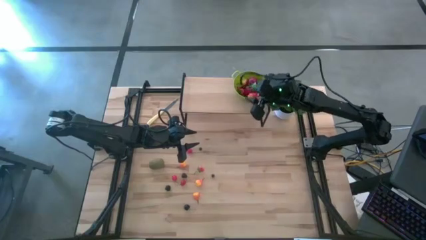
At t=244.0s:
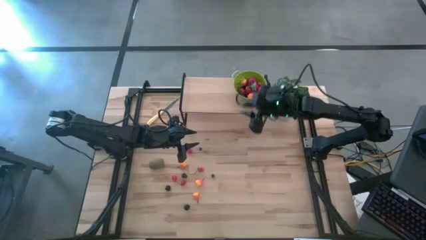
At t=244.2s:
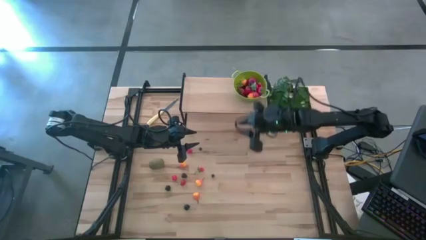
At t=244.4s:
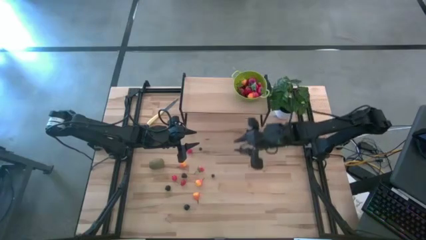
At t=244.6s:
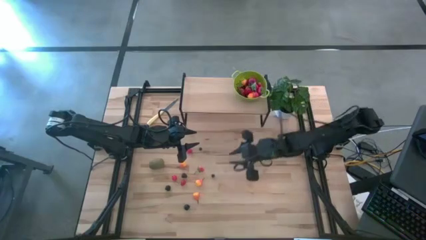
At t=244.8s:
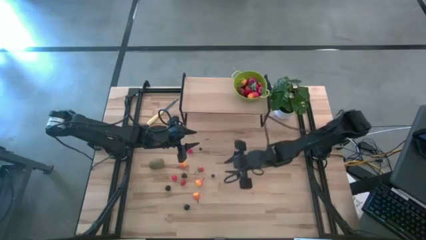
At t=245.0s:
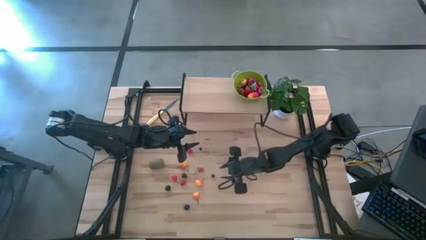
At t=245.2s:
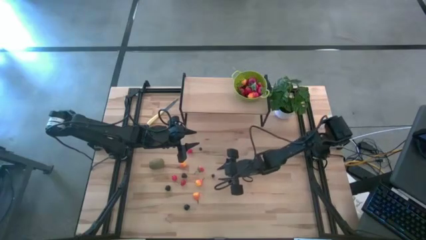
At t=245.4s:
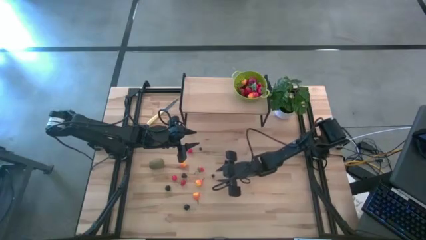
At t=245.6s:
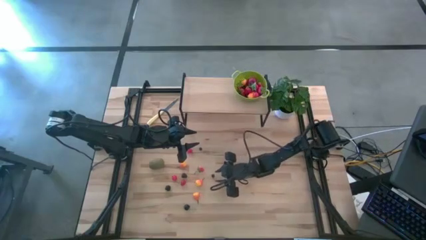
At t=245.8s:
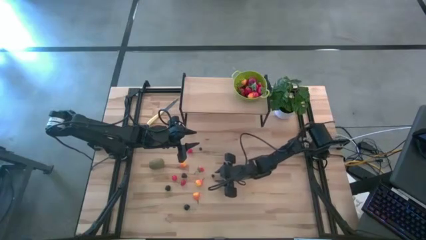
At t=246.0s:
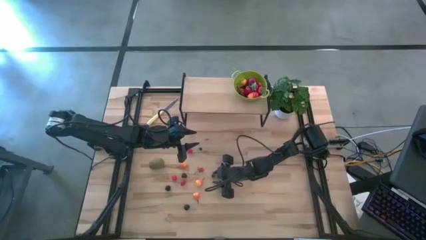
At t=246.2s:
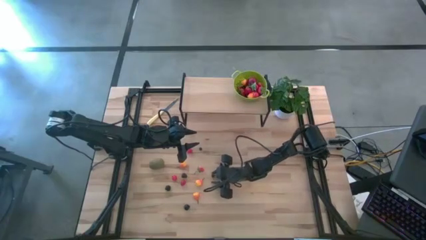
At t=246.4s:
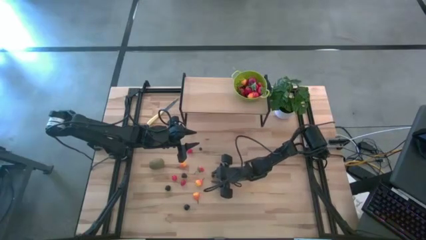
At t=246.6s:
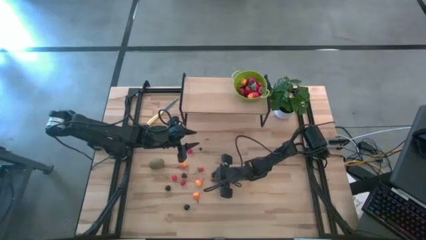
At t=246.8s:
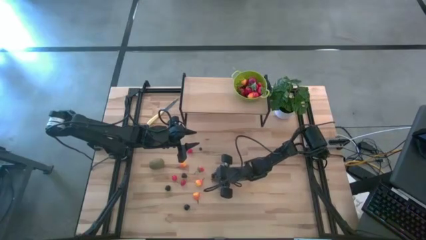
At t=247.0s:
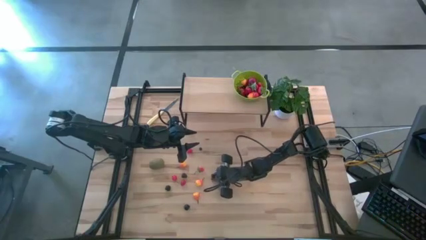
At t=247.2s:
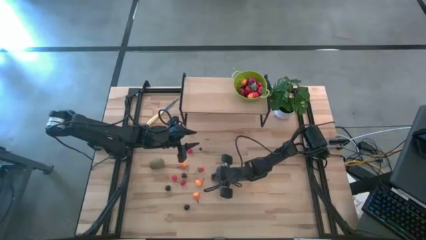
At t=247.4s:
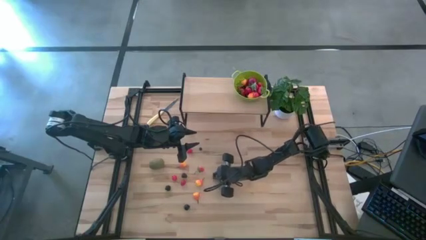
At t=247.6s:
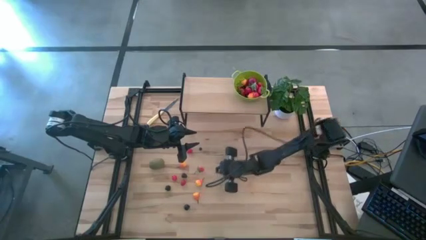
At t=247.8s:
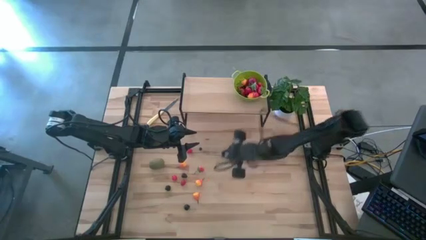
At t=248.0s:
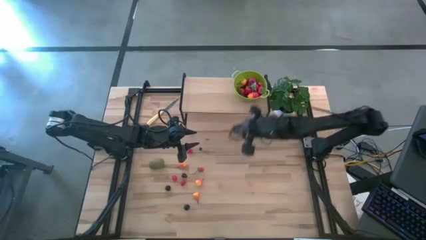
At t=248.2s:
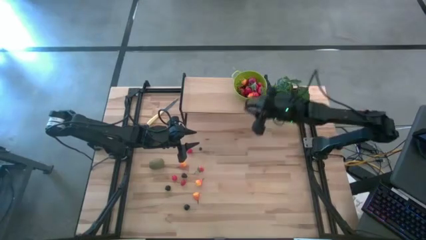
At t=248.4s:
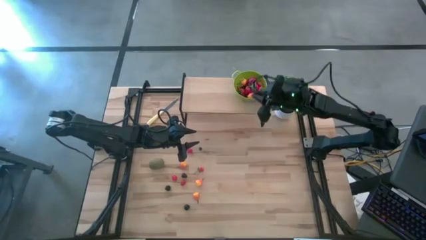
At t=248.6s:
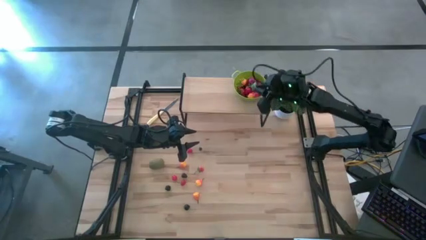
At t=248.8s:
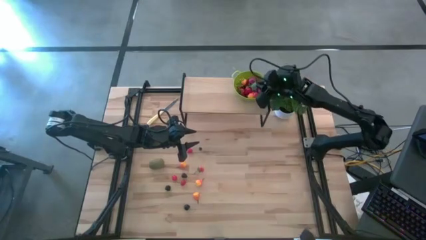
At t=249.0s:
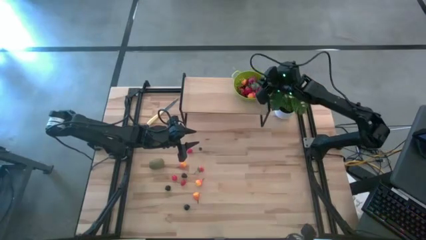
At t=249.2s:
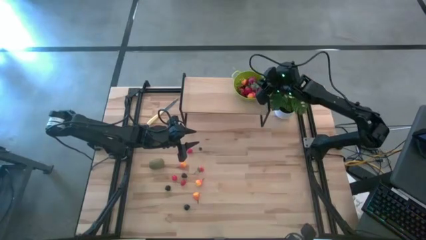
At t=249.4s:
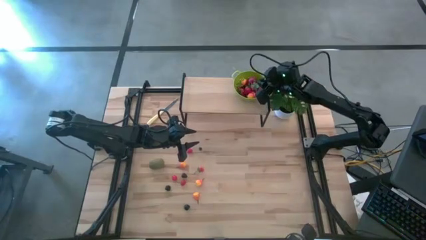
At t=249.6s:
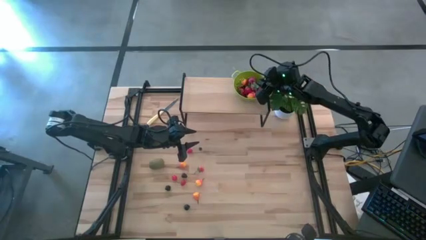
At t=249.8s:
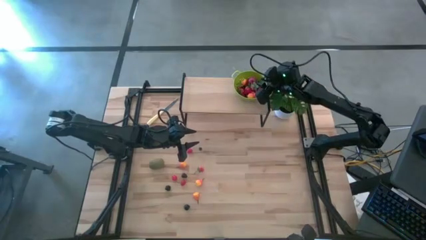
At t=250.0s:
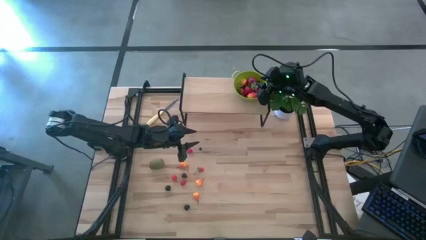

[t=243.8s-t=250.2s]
Task: Build produce basket
Put the blueberry into the green basket

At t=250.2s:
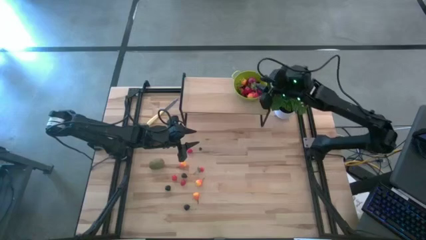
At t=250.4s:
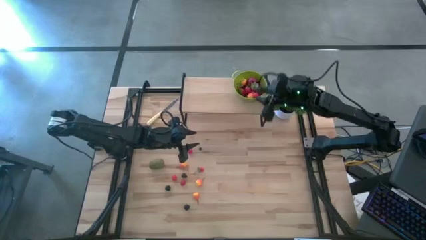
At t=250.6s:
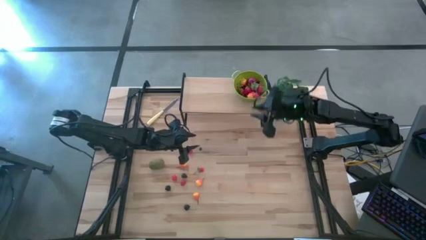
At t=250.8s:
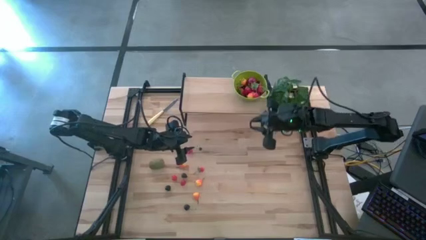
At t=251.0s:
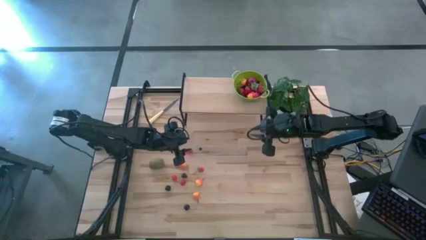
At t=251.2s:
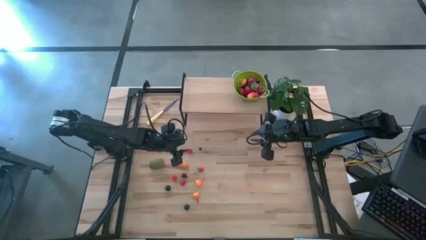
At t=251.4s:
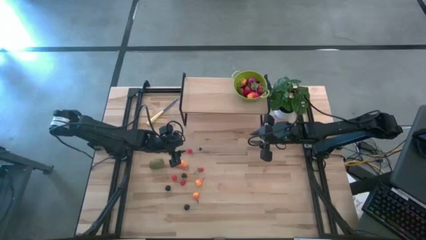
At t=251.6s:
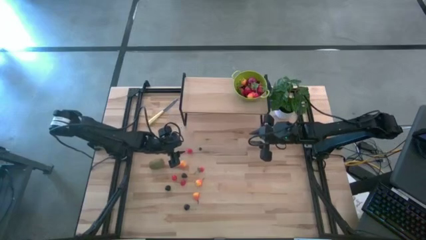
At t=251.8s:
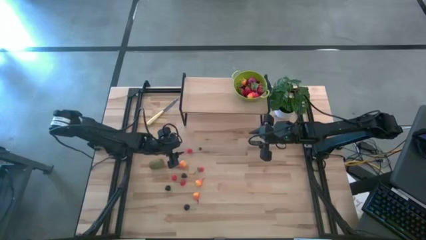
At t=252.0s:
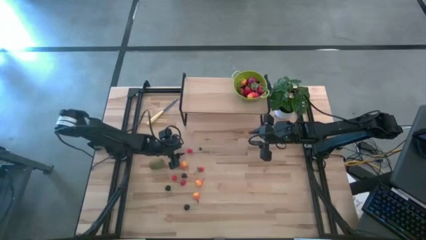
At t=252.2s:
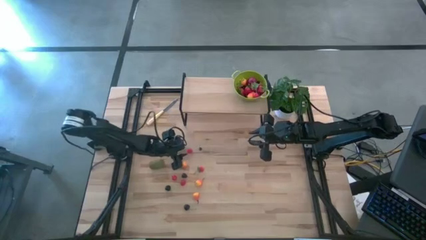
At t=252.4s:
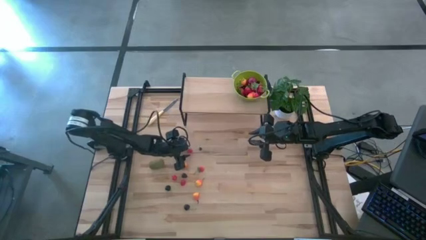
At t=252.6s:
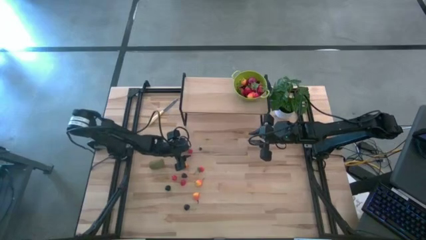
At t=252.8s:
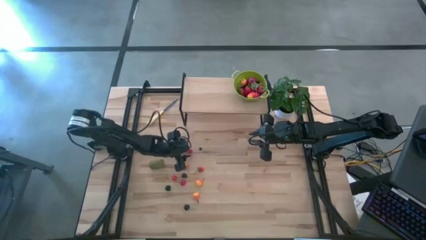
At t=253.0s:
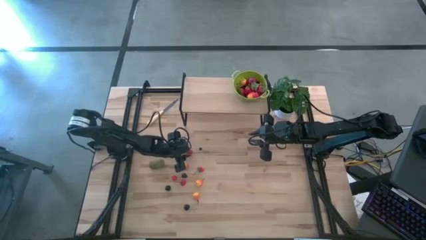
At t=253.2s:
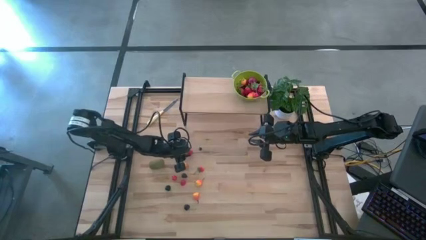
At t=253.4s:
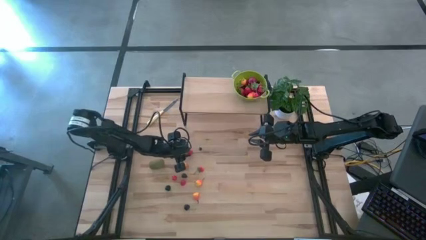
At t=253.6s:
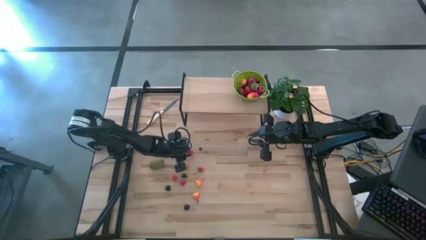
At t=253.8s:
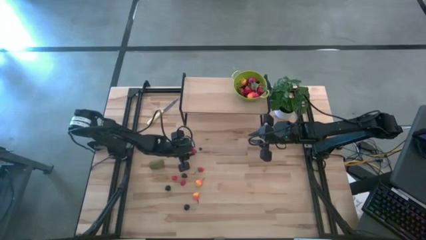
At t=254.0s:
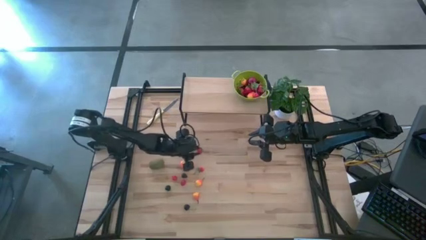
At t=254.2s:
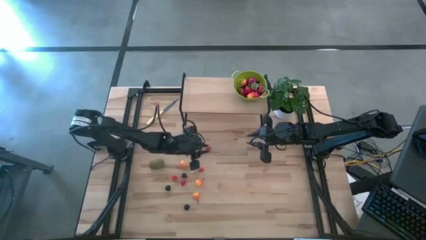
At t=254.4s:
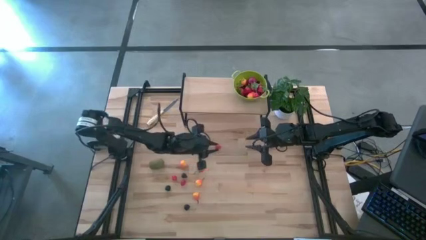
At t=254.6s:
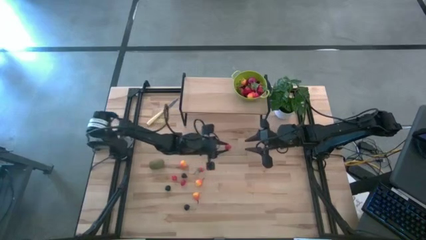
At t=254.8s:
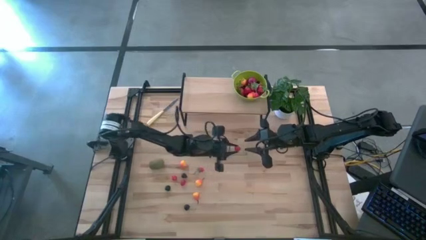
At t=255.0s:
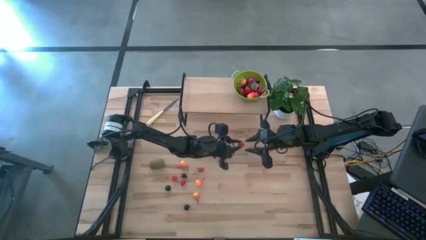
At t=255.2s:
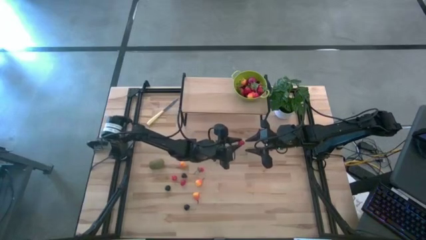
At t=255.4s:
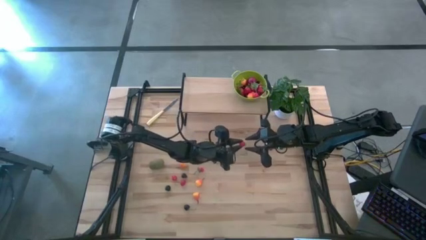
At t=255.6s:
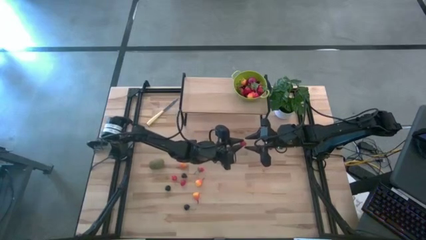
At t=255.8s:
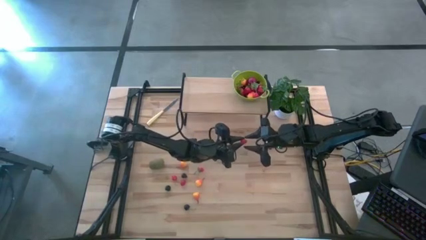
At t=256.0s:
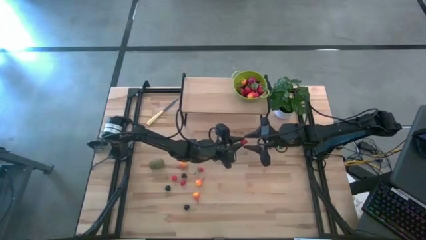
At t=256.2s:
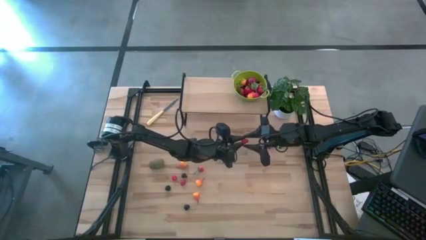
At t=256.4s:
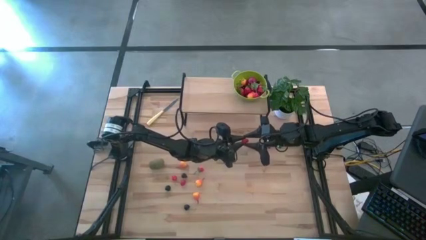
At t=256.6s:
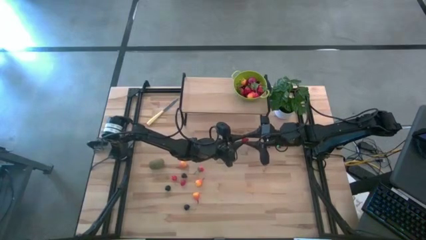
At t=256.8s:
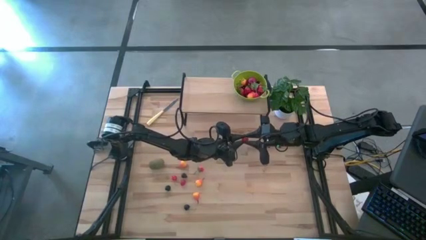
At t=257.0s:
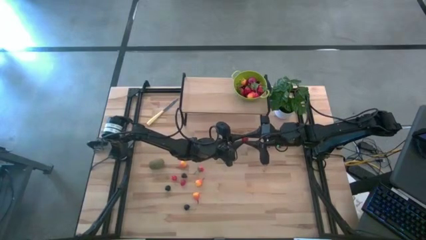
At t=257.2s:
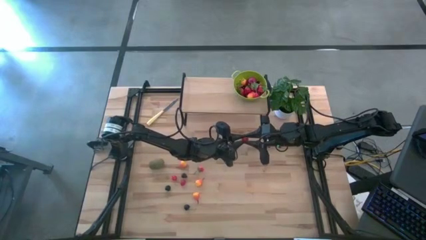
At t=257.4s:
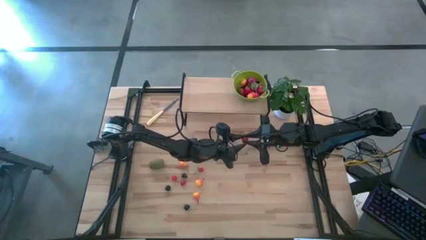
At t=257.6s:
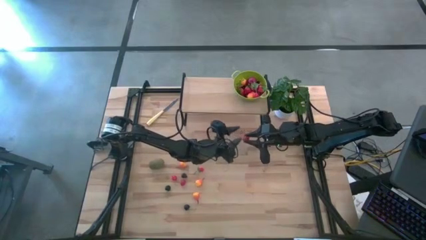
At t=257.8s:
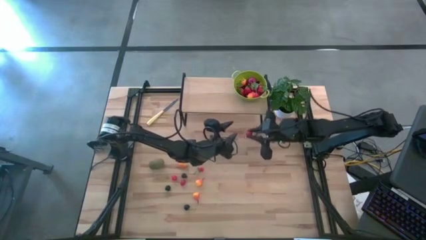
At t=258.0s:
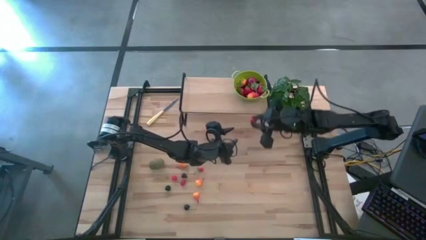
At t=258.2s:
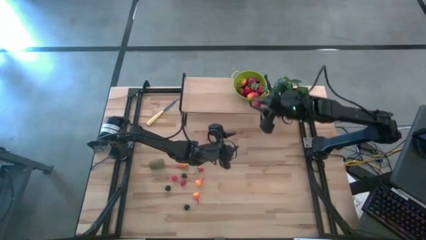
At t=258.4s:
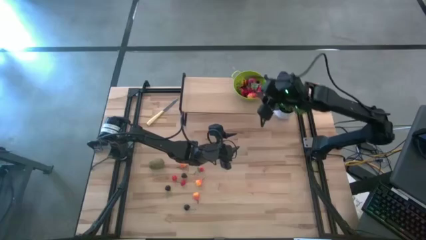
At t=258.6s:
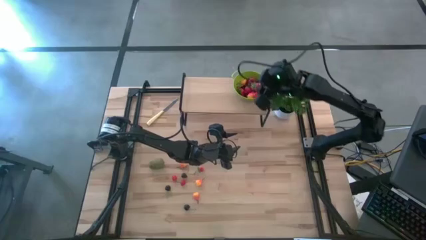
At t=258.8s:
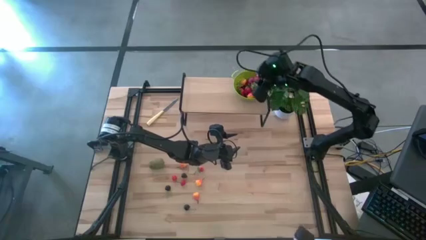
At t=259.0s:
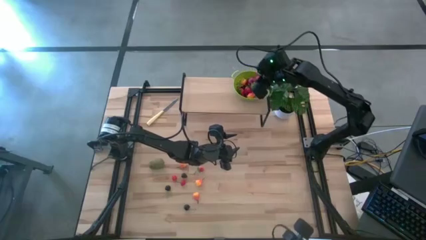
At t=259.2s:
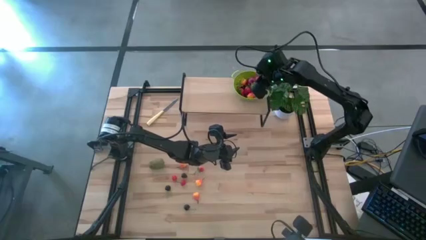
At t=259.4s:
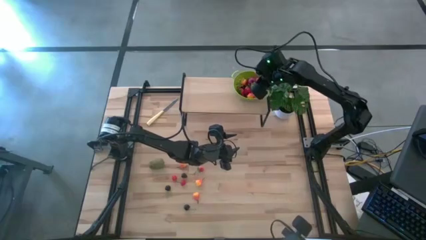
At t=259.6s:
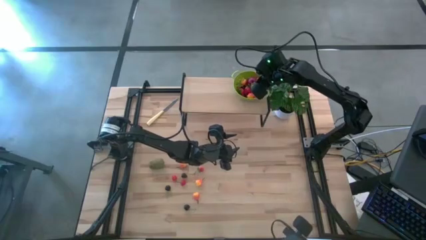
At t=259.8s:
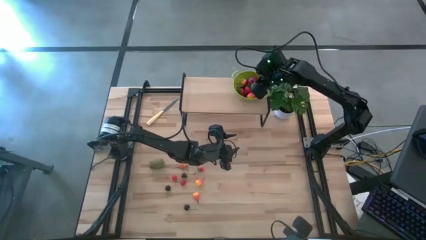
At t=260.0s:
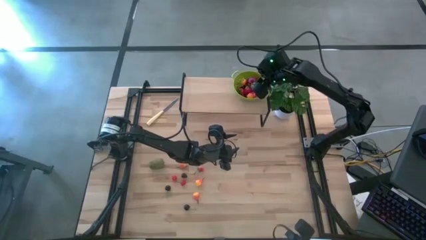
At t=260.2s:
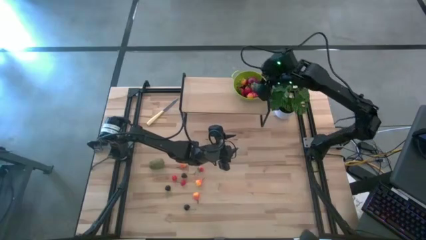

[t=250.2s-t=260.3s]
Put the raspberry into the green basket
